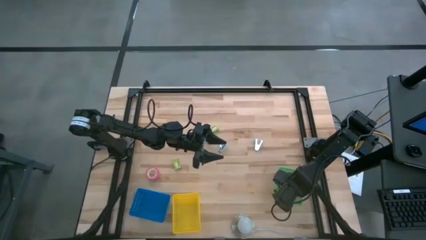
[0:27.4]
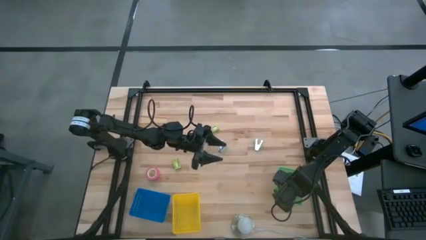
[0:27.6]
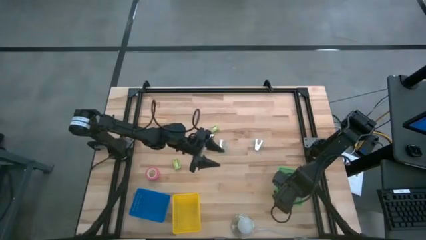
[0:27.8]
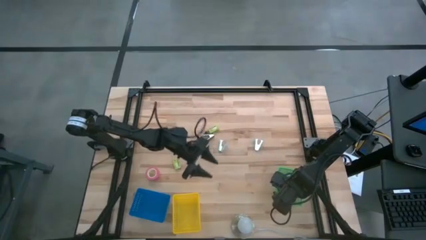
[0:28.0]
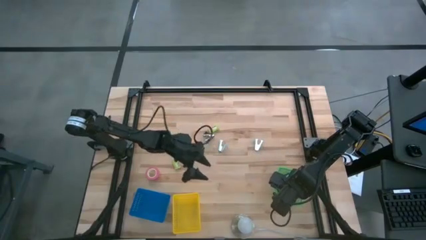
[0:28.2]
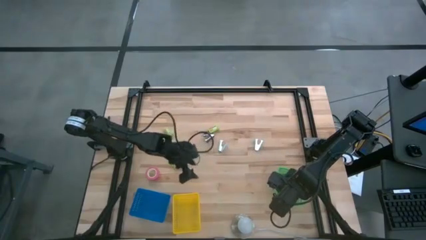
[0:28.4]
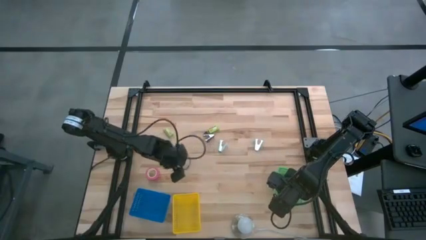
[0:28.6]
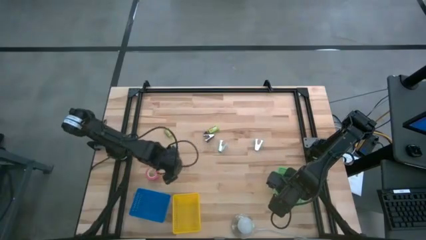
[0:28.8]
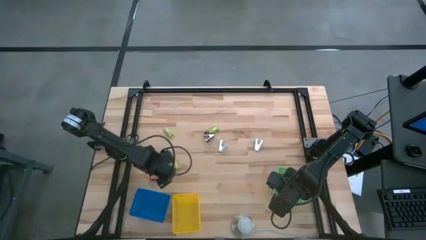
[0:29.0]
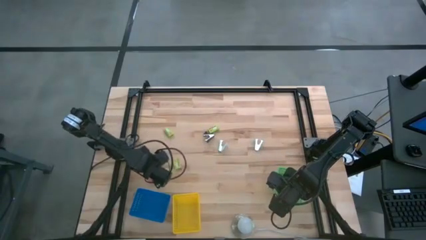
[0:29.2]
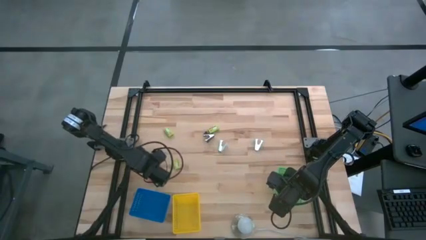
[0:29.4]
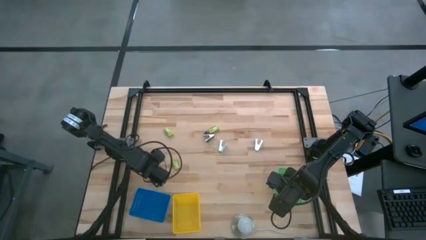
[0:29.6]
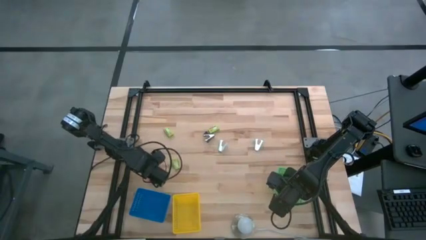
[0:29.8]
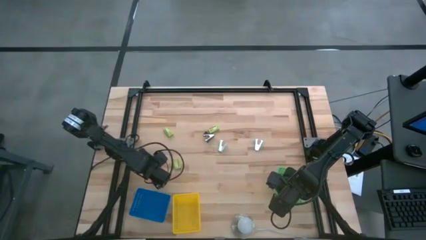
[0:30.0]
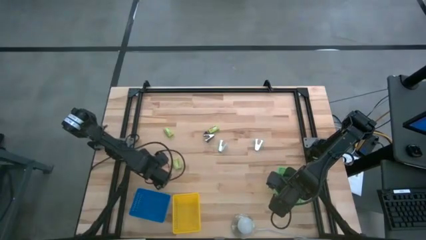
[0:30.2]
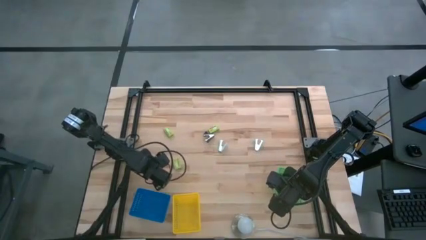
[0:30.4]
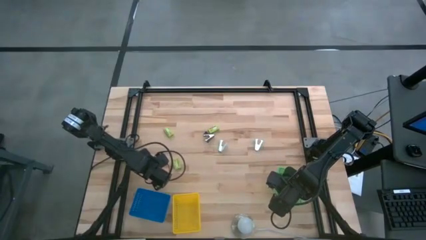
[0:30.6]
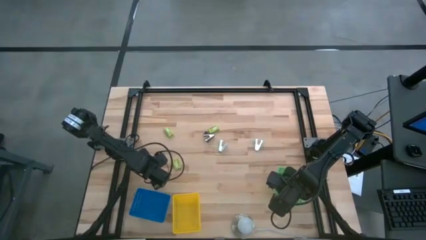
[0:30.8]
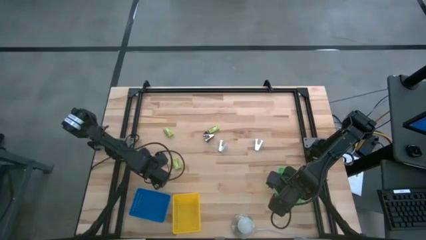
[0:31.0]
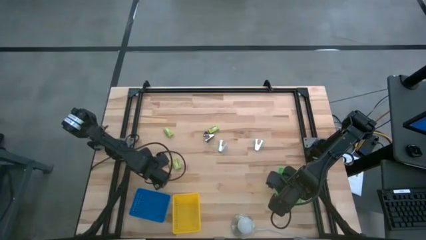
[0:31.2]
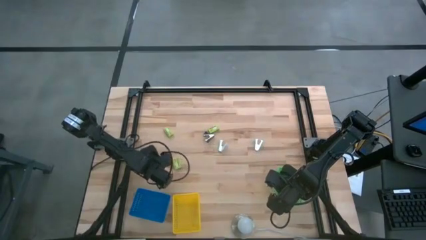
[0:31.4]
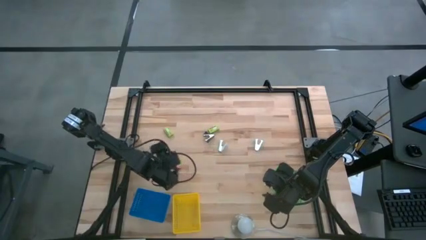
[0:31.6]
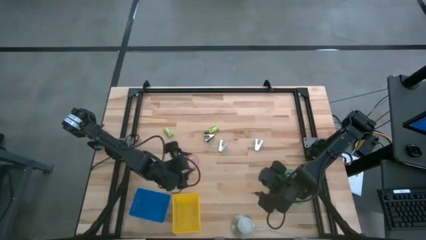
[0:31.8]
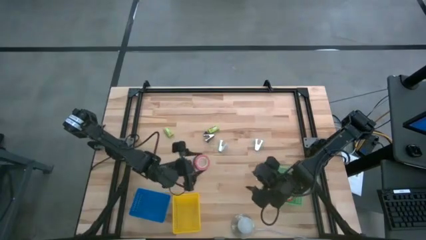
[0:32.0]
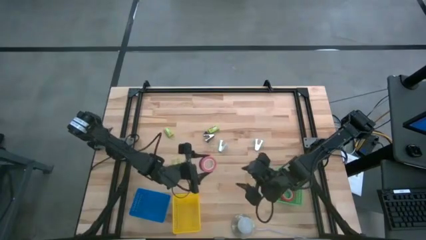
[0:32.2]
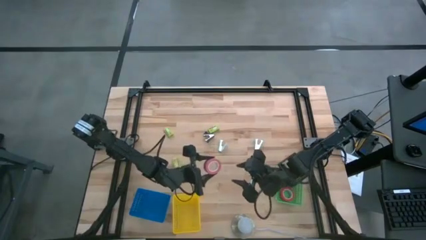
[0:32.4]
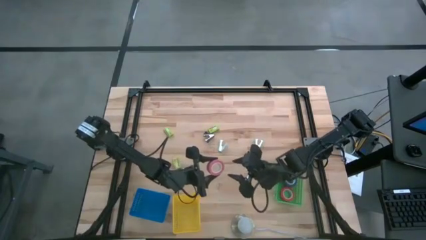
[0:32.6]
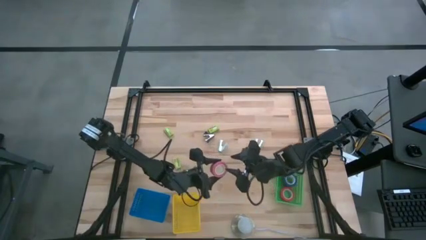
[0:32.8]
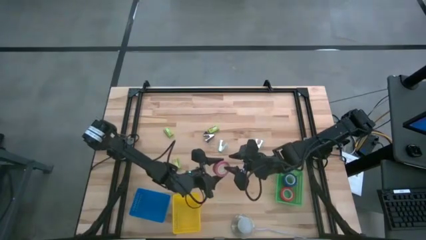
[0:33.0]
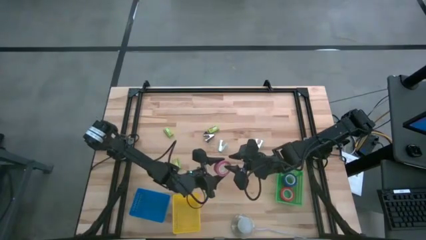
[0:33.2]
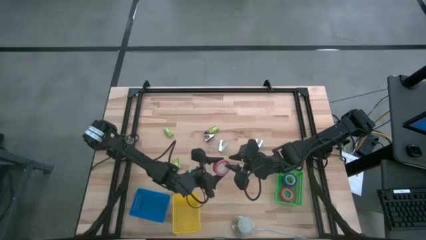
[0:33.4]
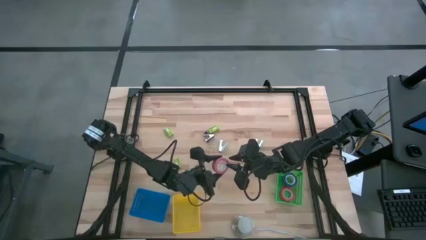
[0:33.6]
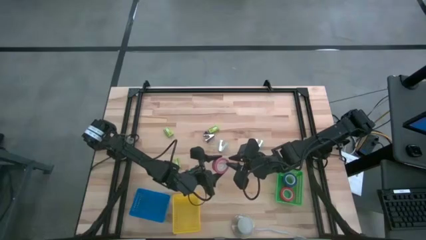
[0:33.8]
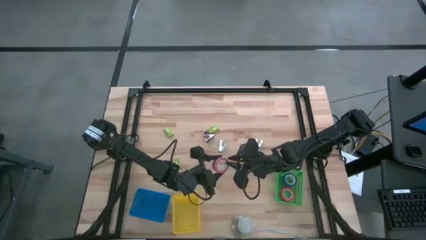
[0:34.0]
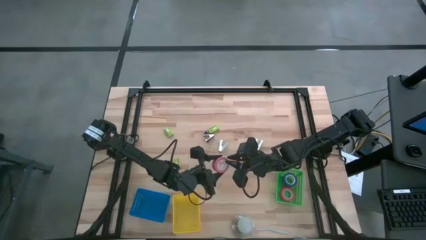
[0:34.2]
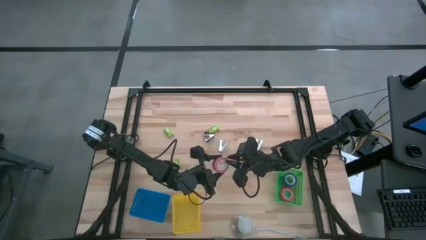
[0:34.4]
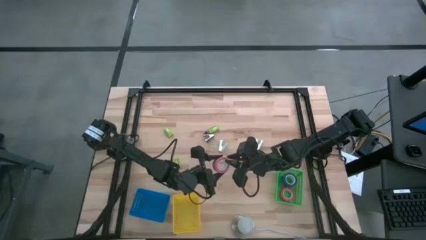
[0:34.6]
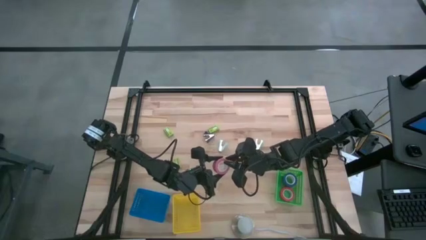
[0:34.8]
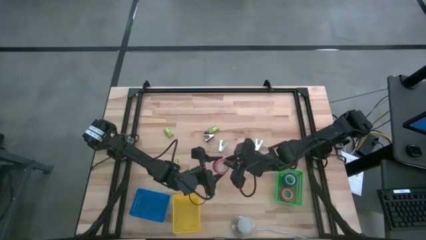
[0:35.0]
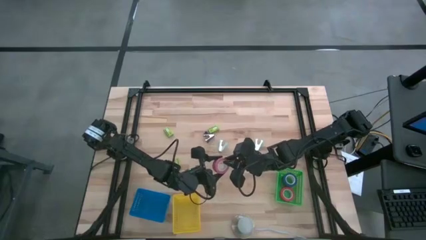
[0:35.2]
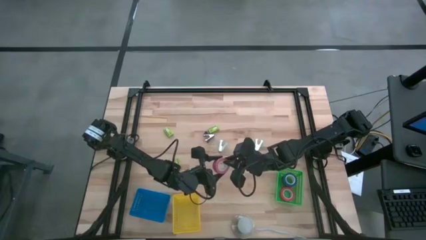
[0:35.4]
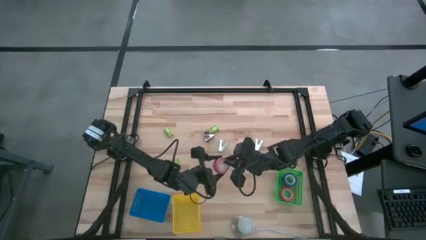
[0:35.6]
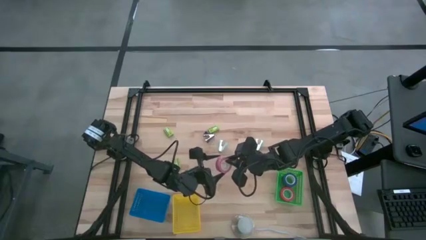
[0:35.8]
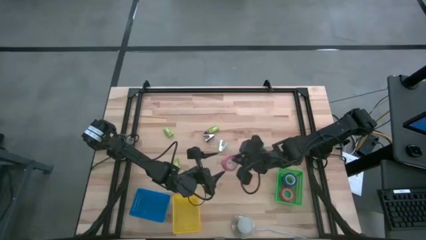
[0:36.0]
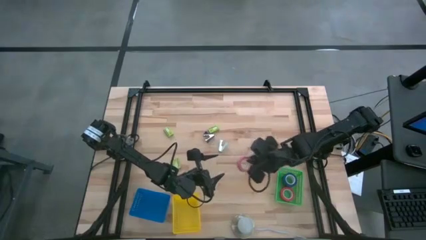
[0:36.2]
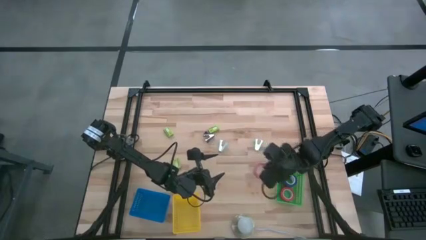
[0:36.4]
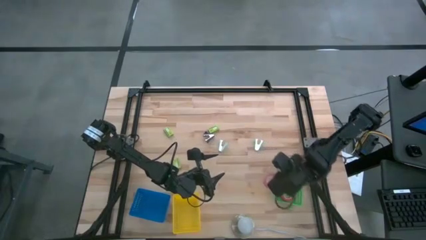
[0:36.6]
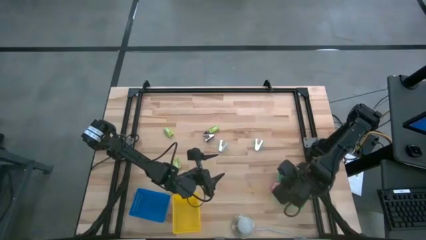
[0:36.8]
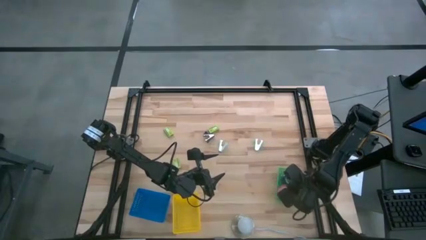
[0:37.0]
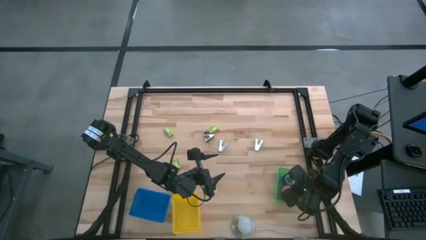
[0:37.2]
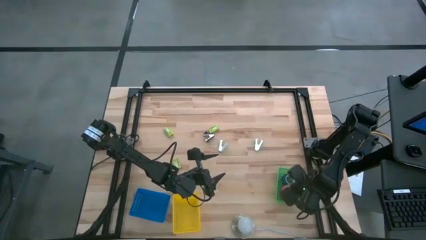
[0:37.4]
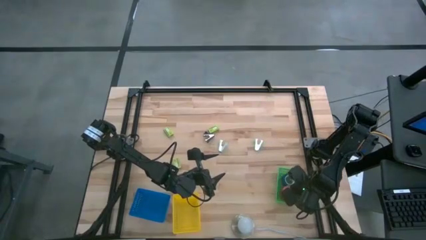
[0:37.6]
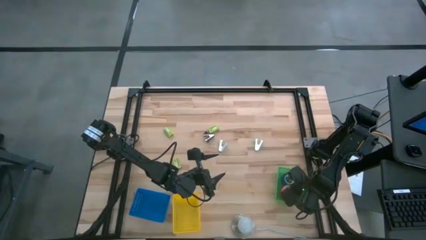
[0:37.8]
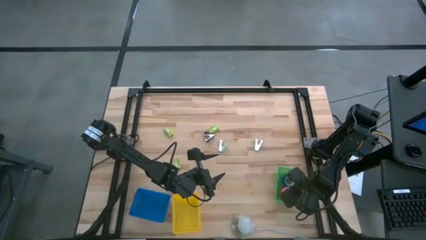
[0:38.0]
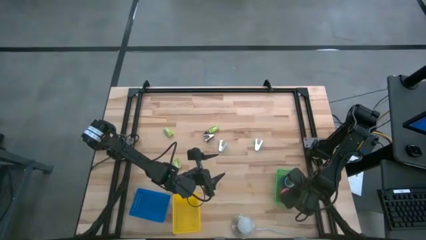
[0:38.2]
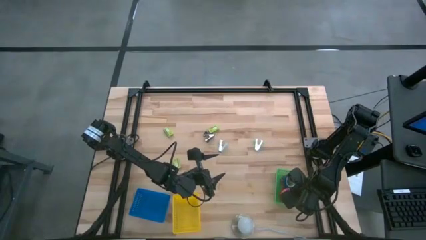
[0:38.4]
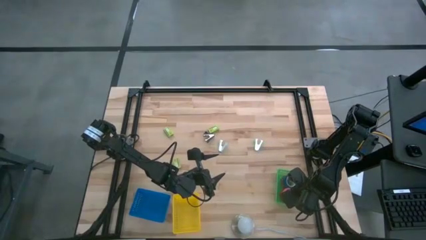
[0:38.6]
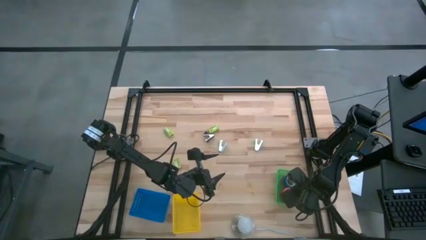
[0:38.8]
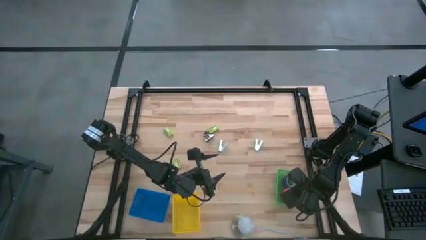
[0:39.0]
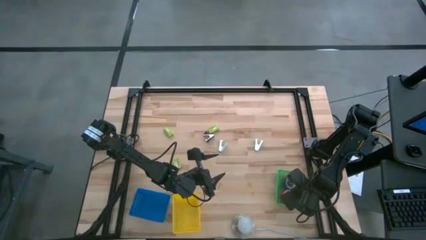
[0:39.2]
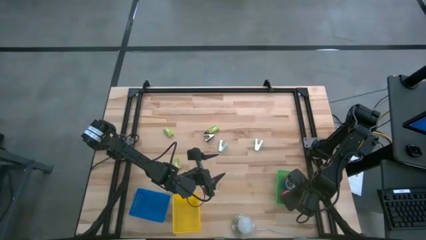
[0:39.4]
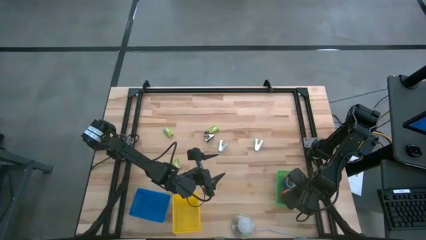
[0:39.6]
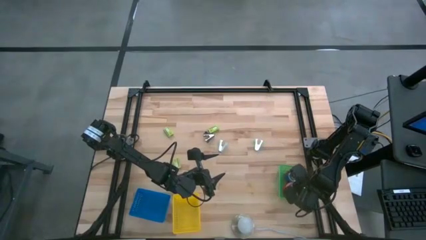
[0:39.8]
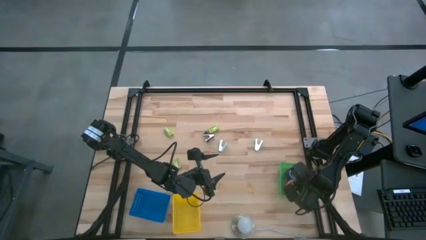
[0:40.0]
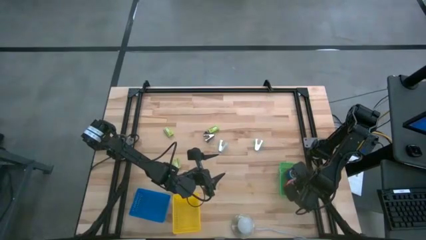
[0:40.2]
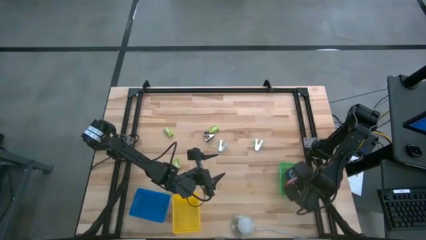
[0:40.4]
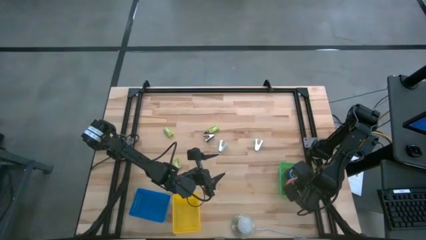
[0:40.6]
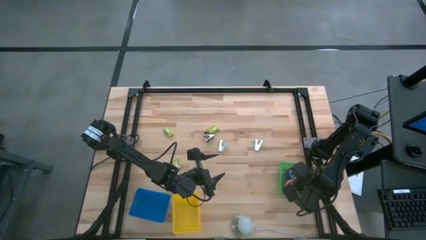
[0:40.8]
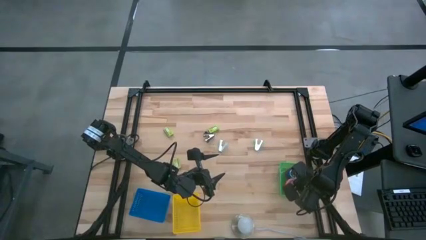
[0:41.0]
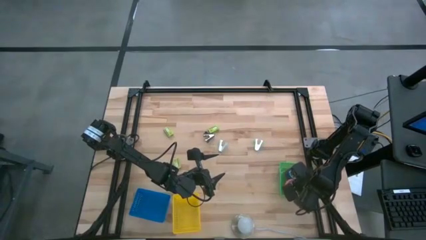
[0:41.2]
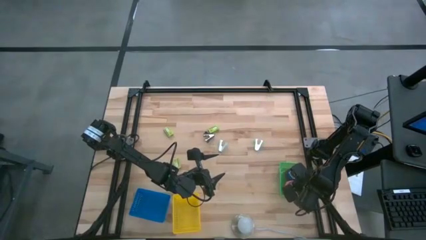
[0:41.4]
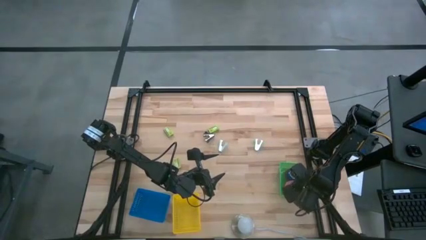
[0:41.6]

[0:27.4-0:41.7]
Task: Pick and place Stapler, Stapler remover, tape
Put the pink tape into the green basket
